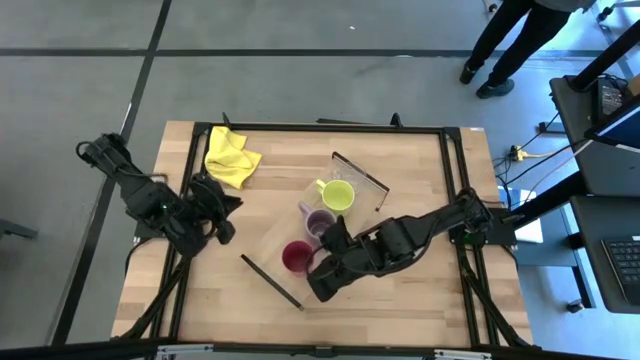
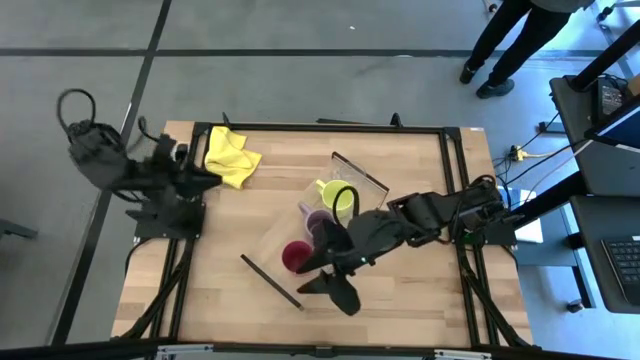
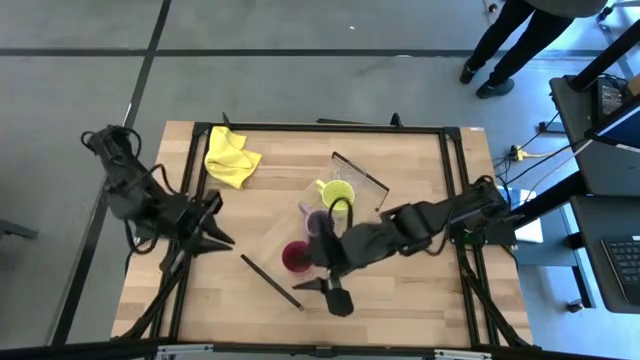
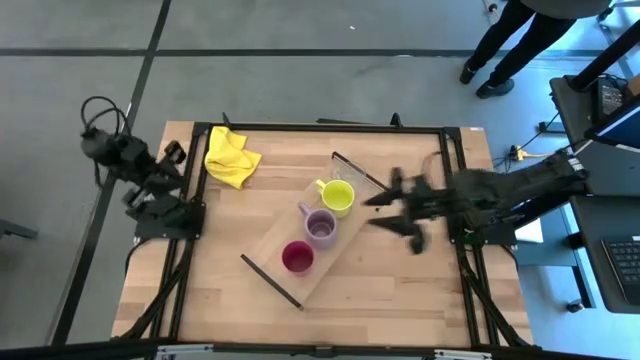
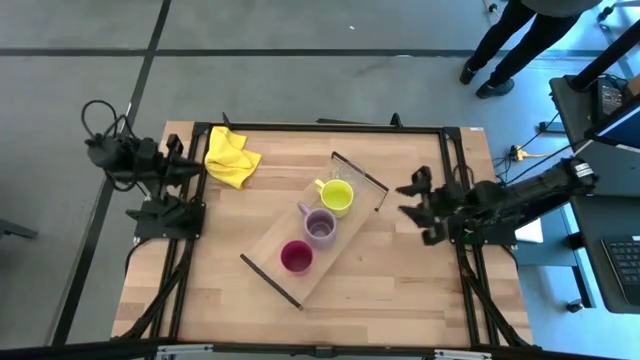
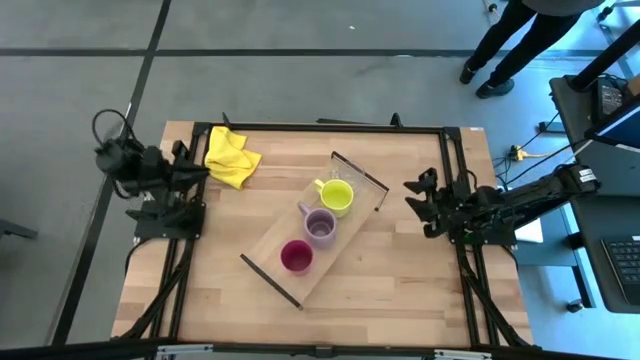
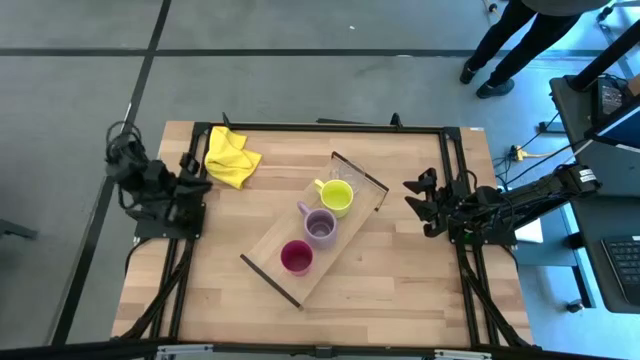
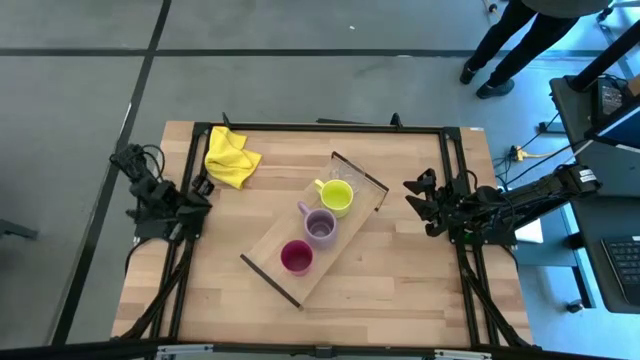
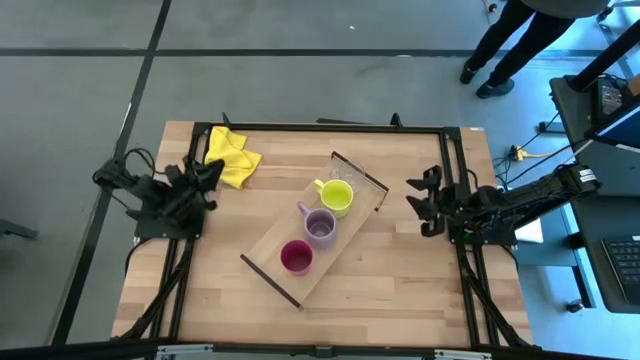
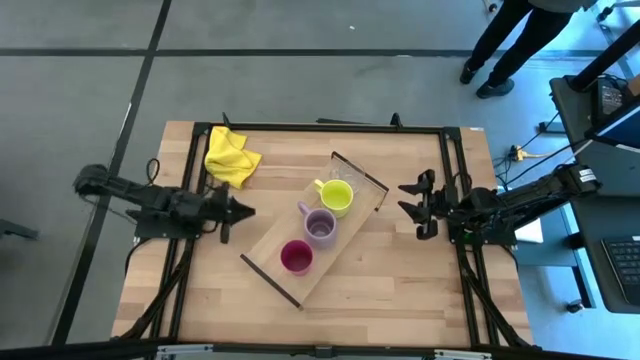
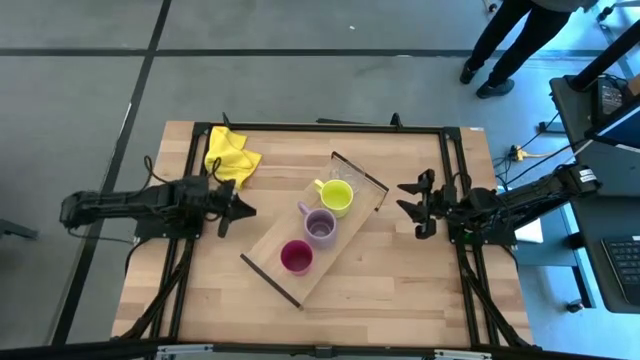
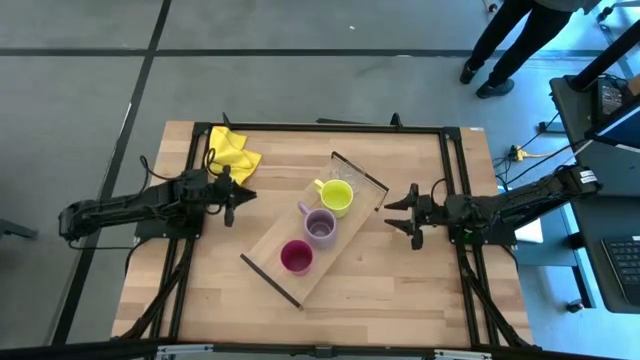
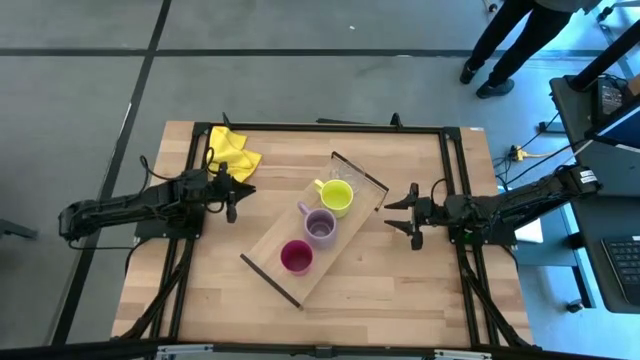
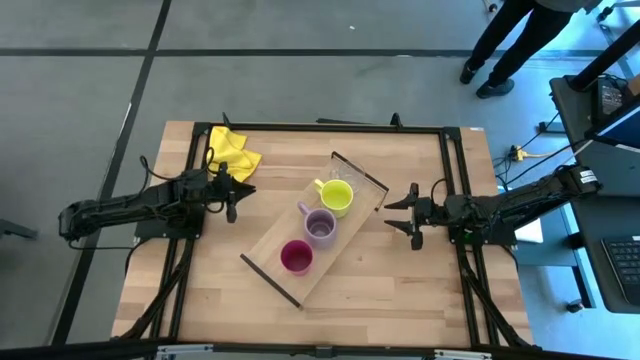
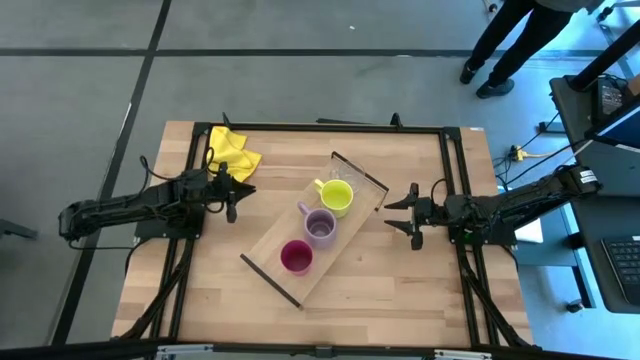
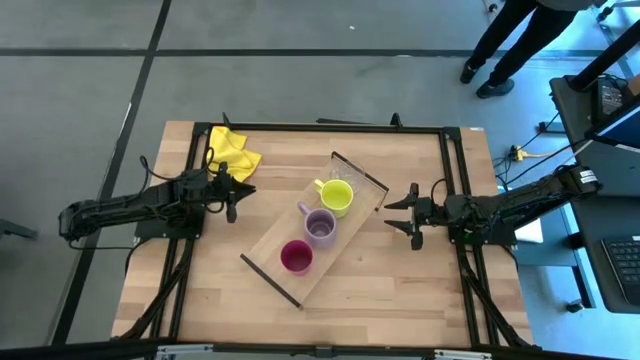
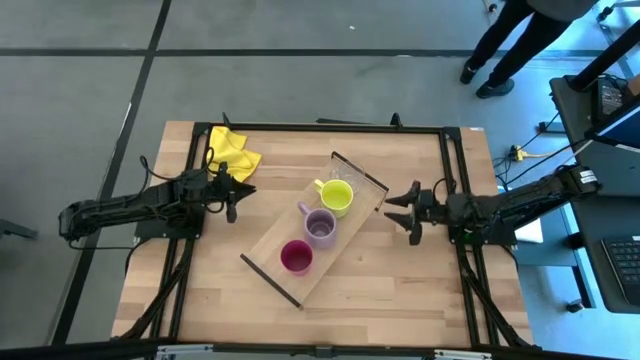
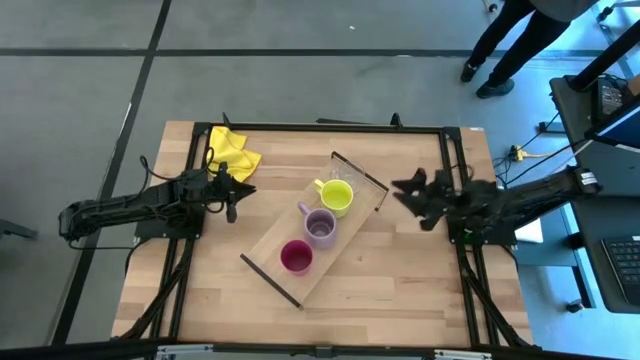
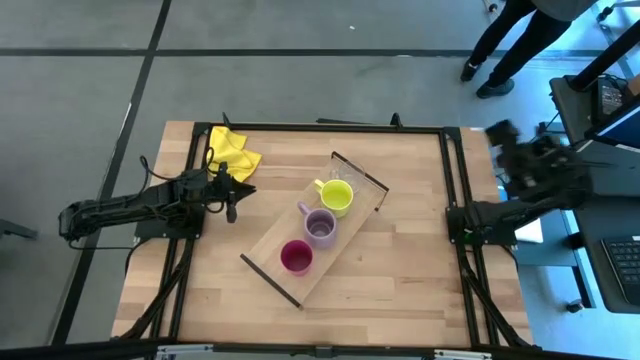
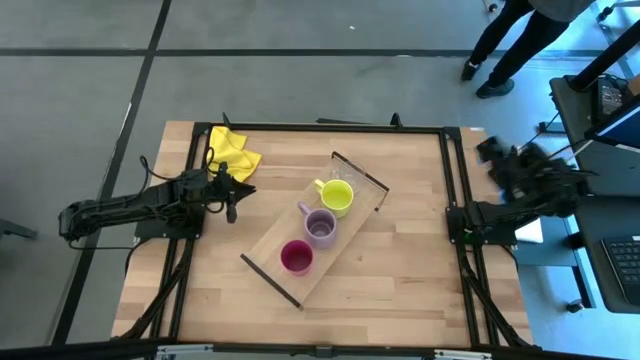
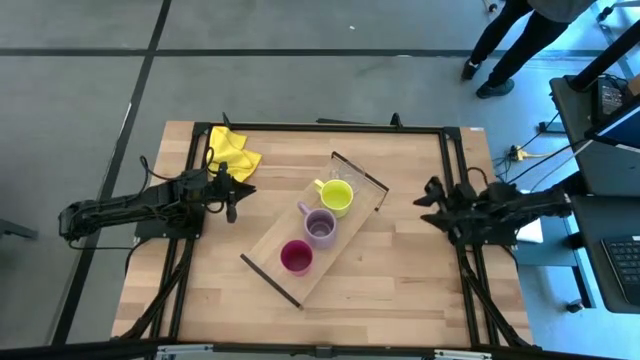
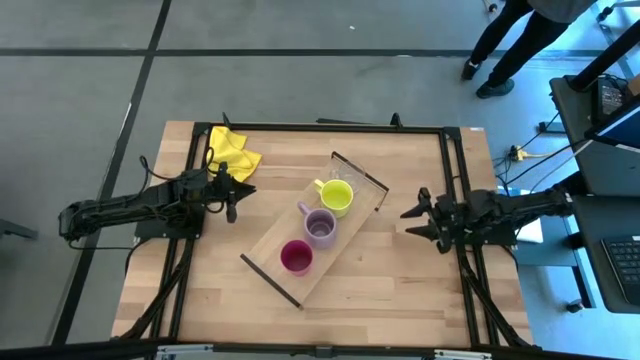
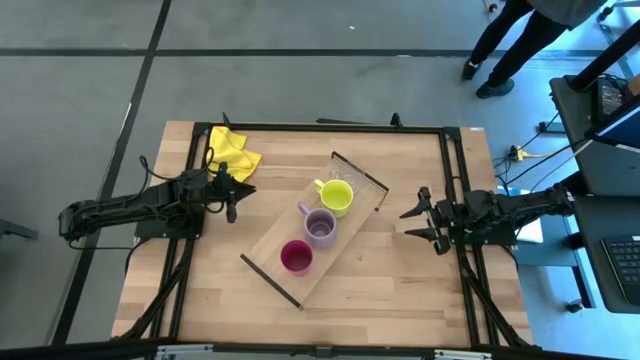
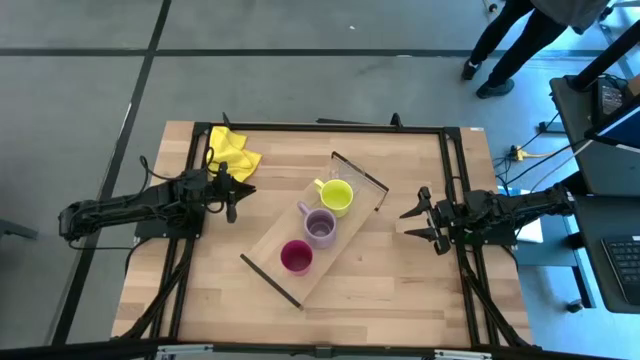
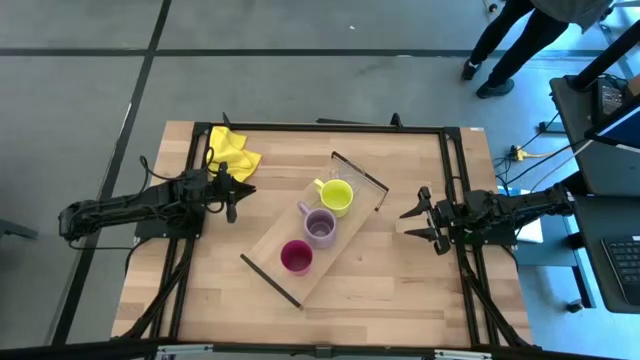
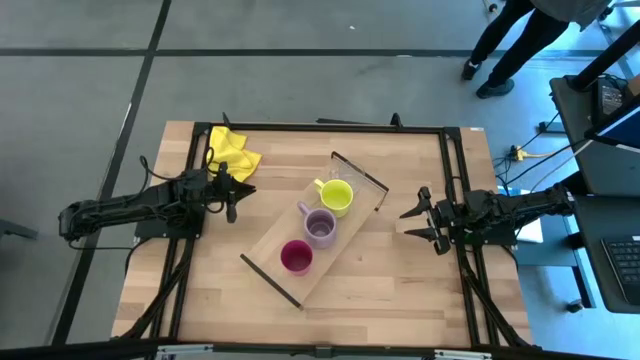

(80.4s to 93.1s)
Task: Stack small to large cups/mugs on shelf
Return to Home Position

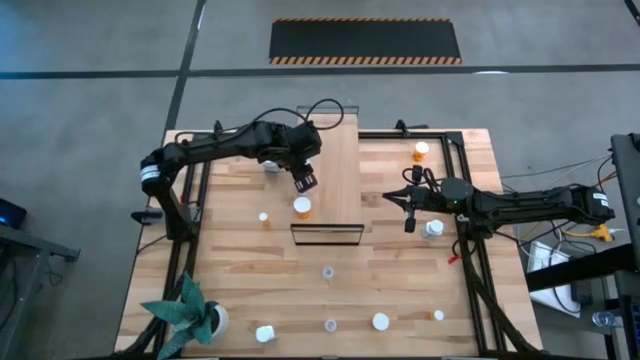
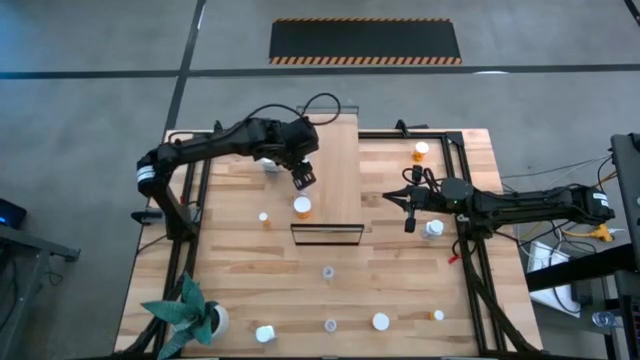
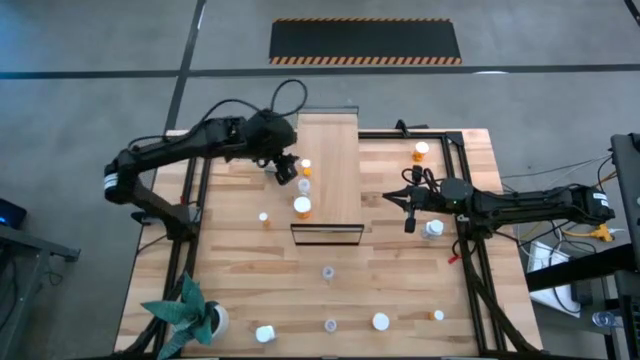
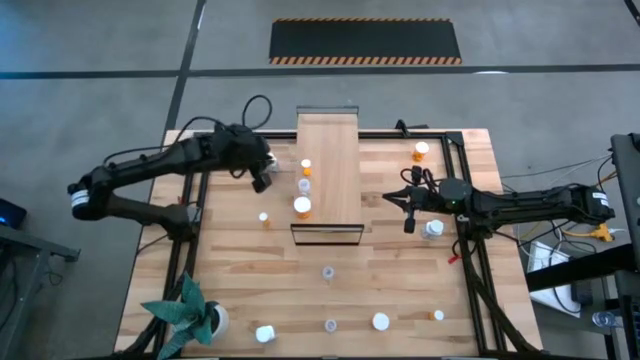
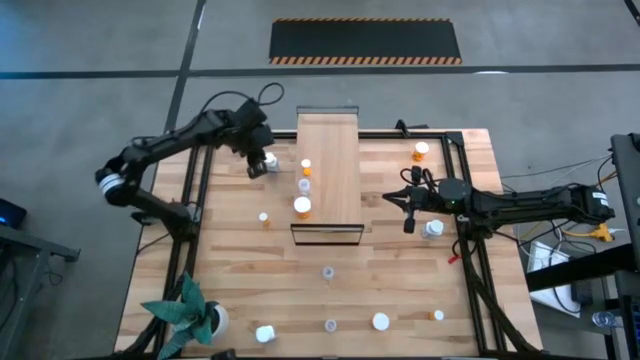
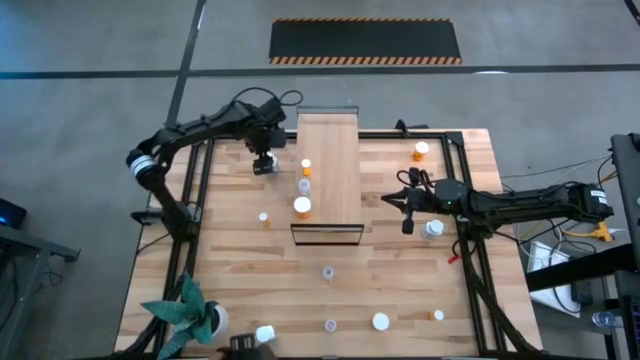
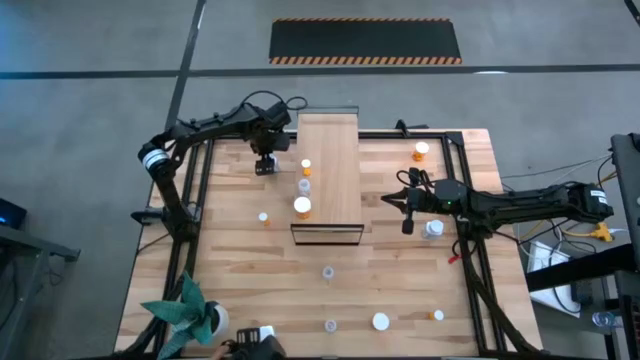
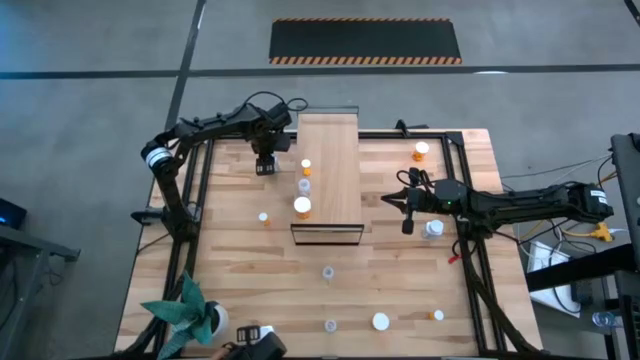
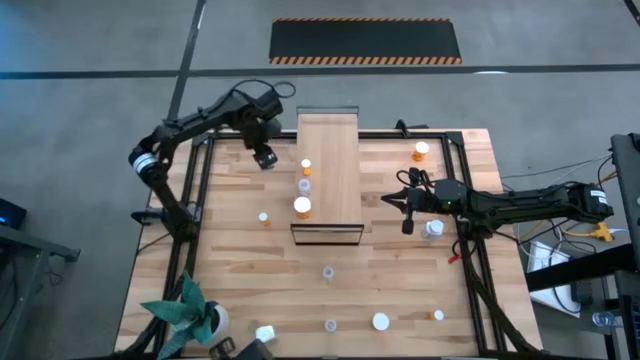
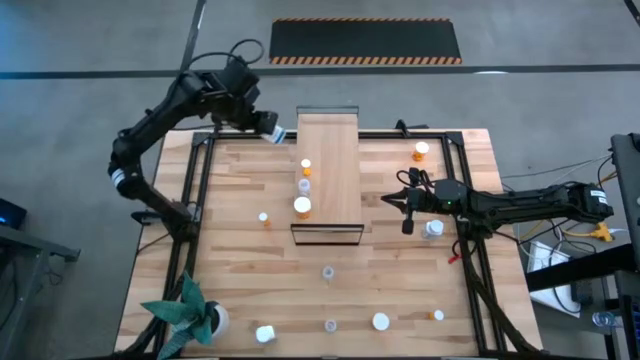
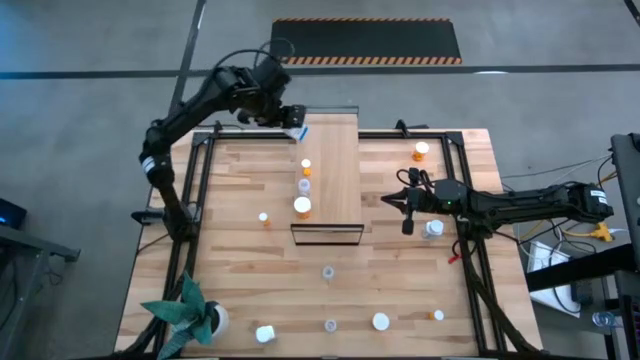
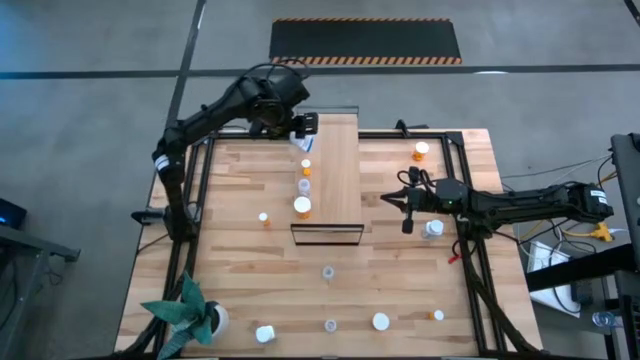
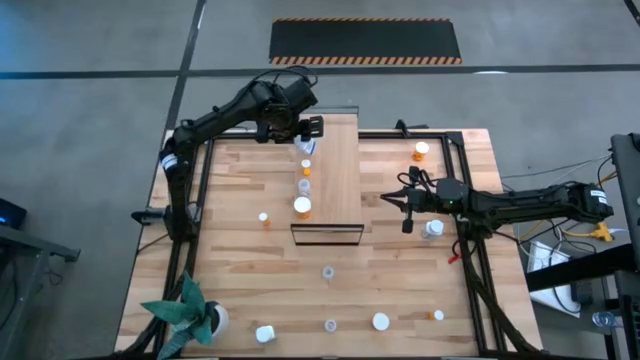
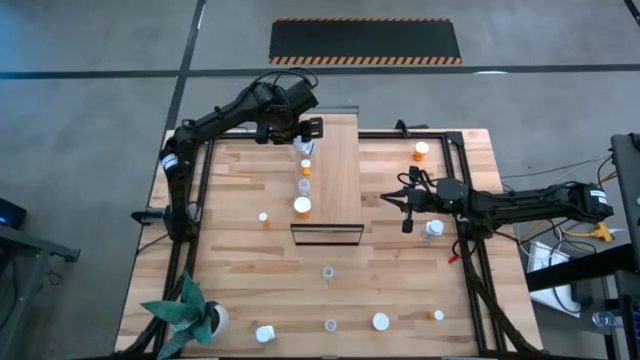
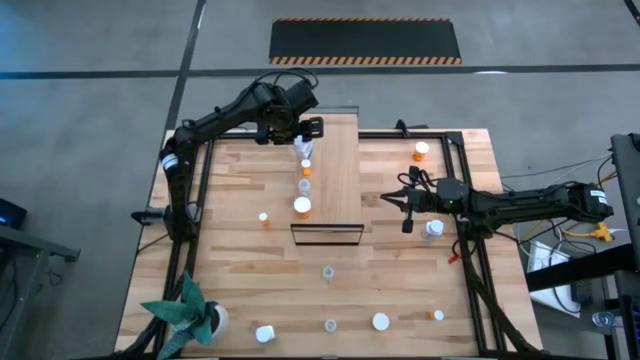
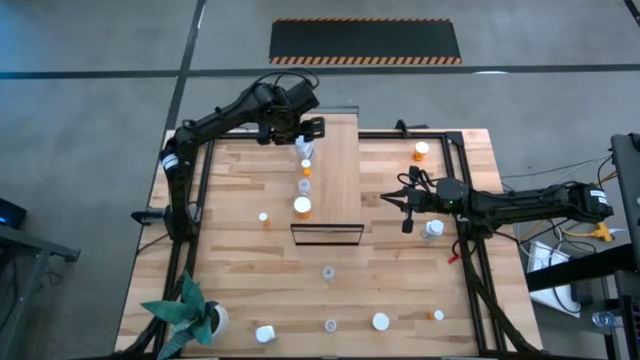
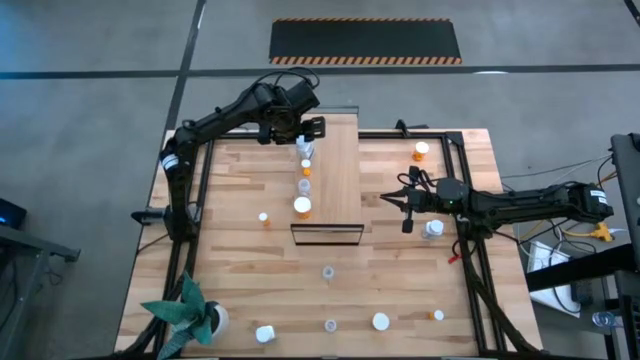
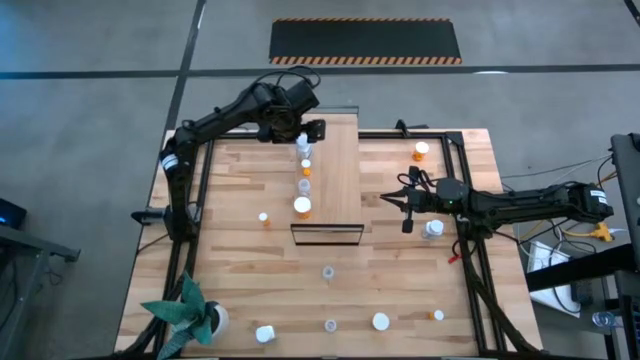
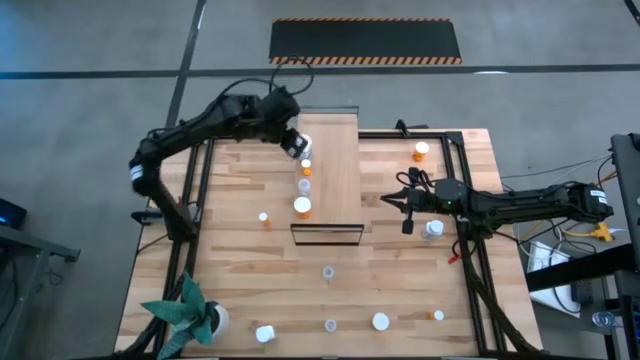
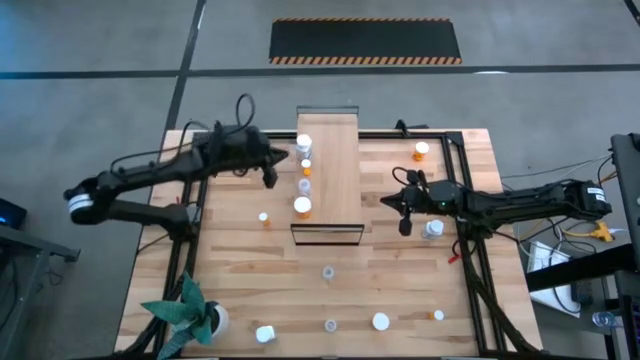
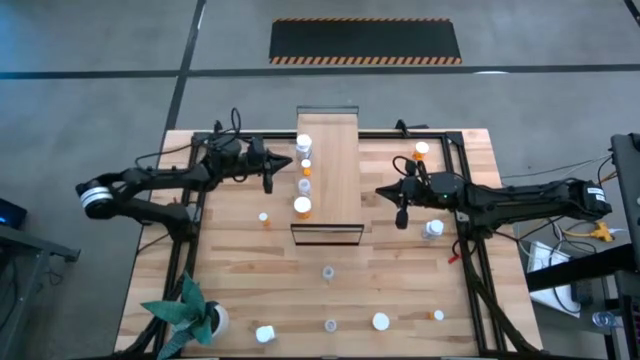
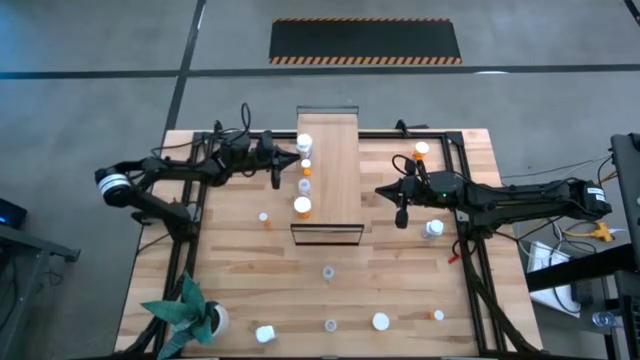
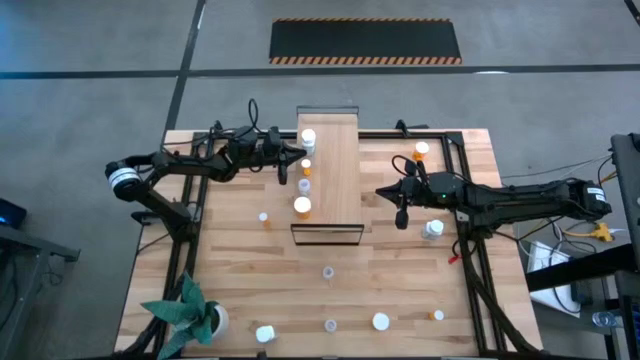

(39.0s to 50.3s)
Task: Pick and place medicine bottles onto shelf by color
Put the top white pill bottle on the shelf
